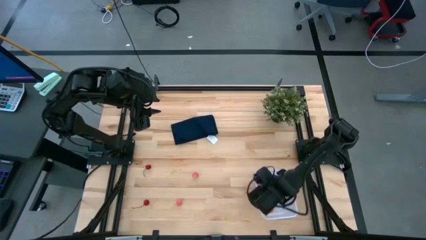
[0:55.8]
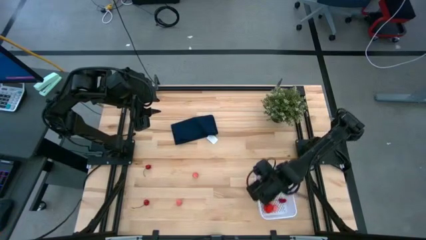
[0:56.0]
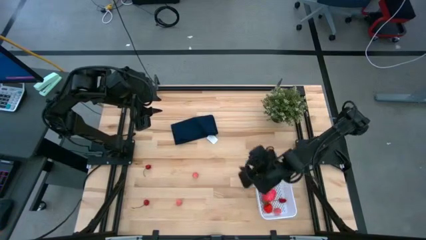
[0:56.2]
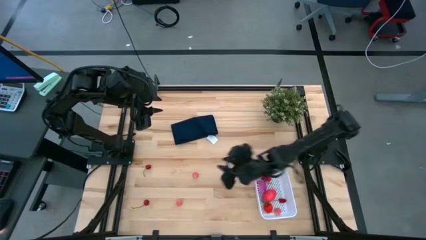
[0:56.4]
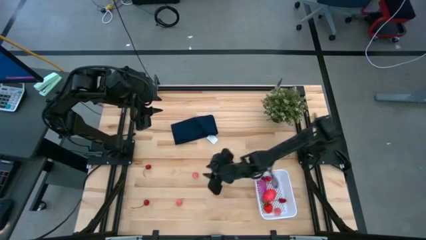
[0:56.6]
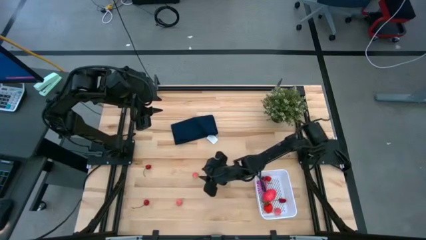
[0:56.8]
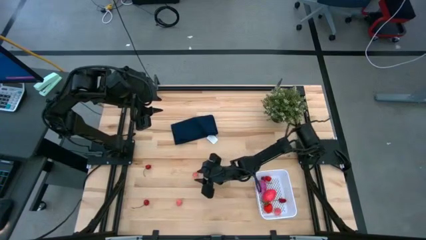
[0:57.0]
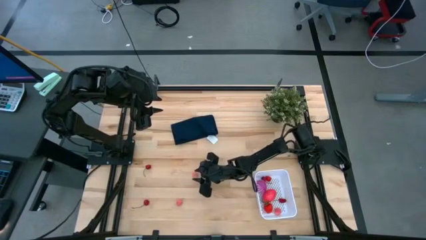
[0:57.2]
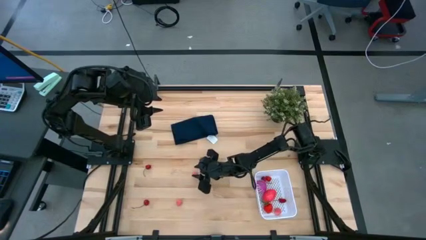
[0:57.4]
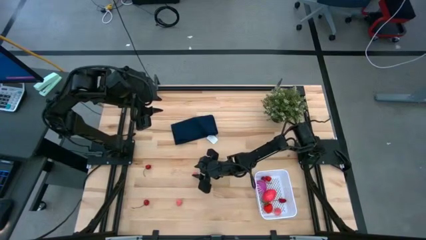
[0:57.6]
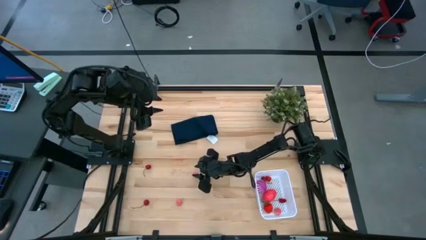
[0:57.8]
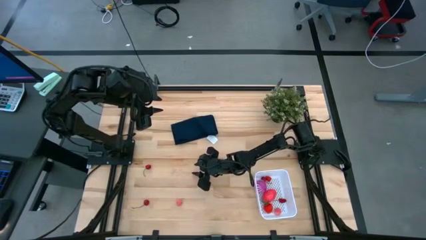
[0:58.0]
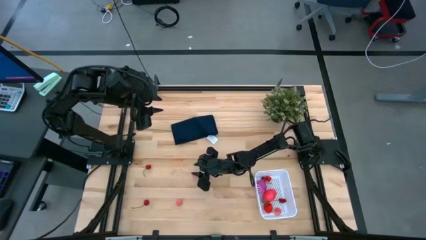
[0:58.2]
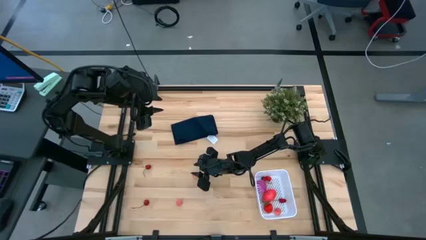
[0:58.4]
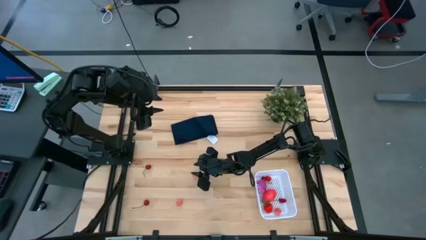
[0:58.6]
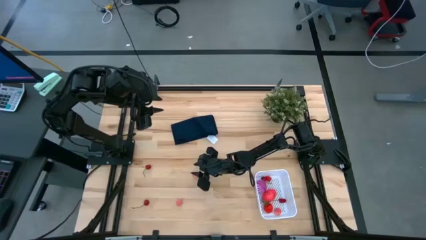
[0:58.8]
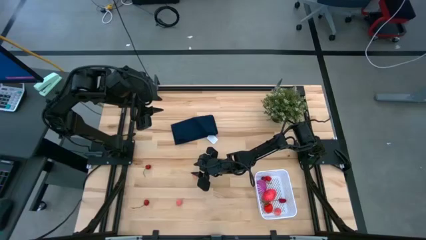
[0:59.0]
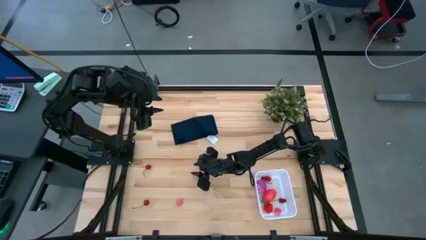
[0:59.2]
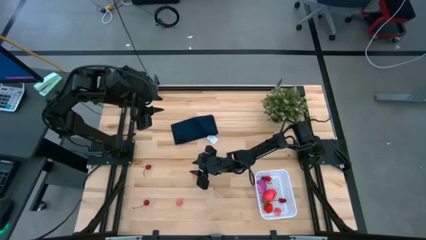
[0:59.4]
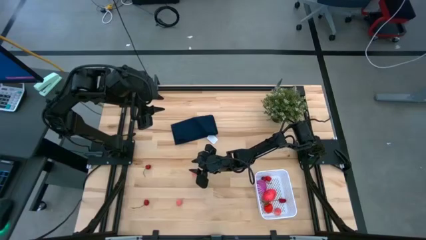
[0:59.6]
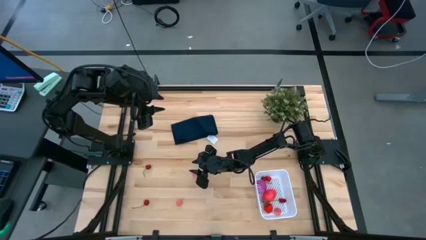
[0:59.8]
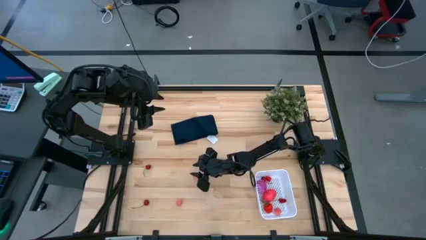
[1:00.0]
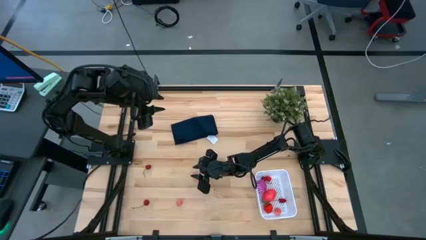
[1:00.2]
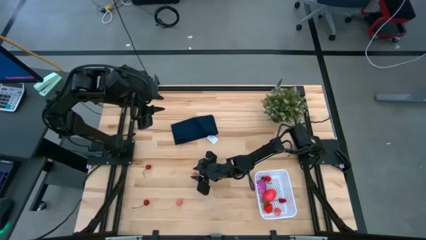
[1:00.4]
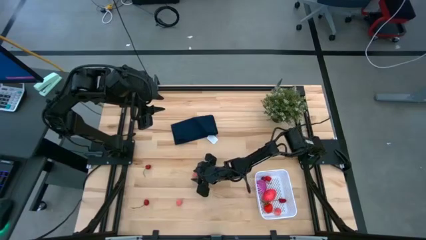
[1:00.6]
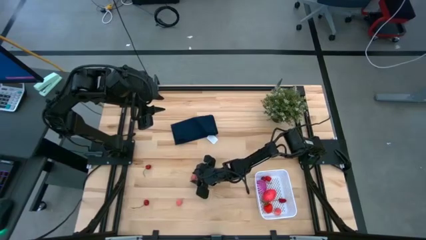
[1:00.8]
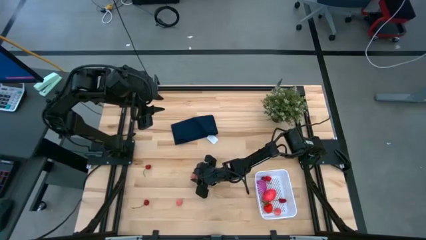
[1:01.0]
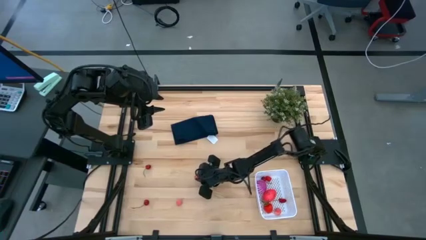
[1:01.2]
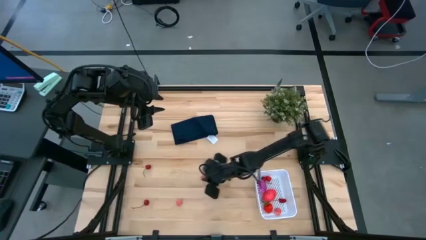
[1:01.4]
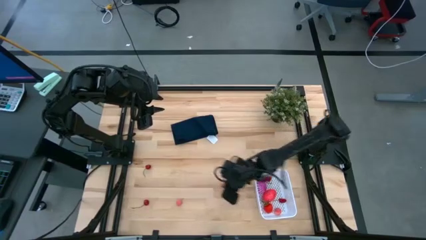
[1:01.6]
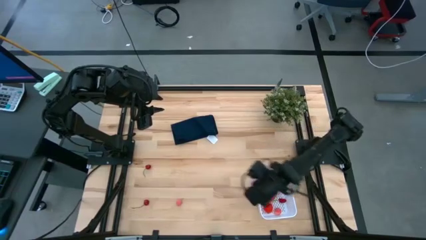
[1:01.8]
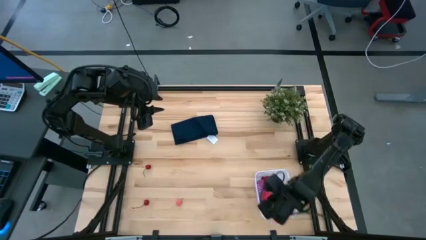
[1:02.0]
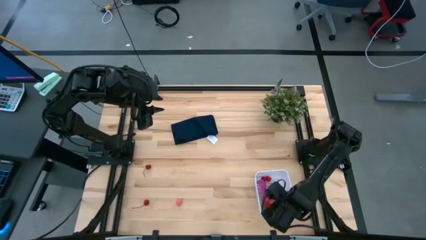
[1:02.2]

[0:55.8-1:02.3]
Task: Pick and placing Produce into tupperware
Put the peach into the white bin

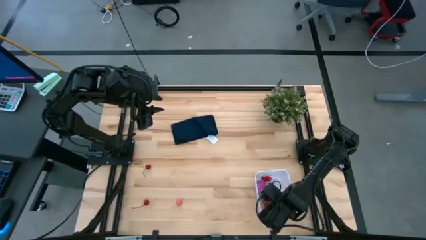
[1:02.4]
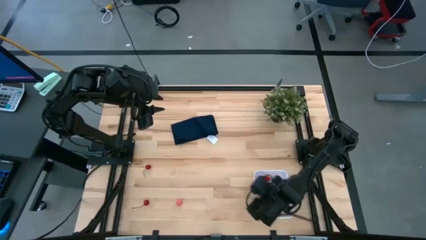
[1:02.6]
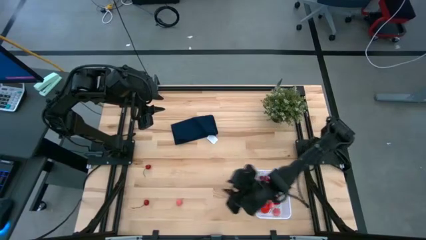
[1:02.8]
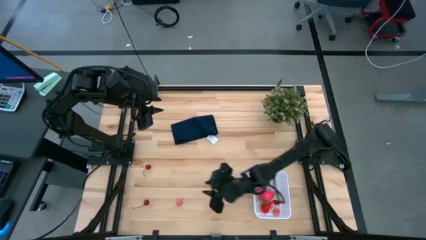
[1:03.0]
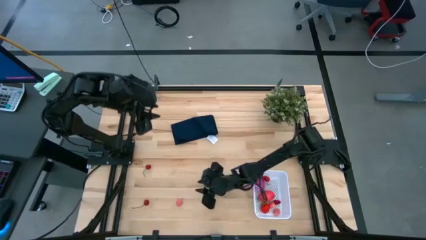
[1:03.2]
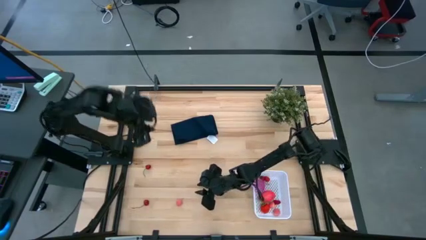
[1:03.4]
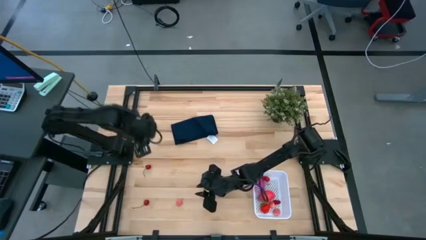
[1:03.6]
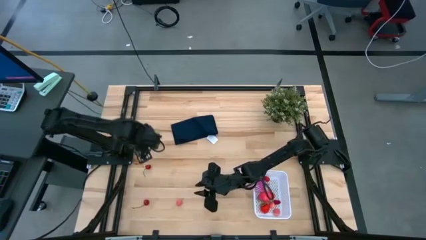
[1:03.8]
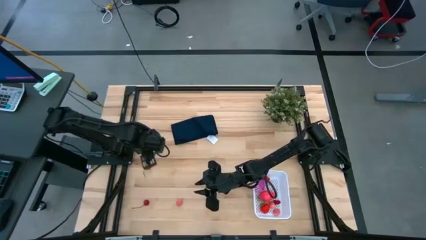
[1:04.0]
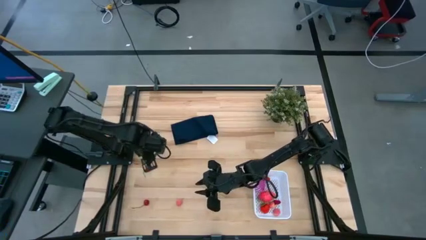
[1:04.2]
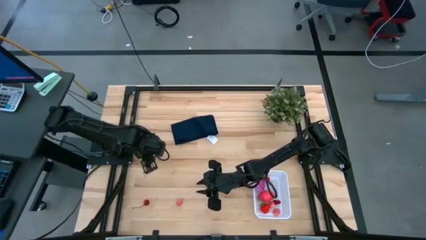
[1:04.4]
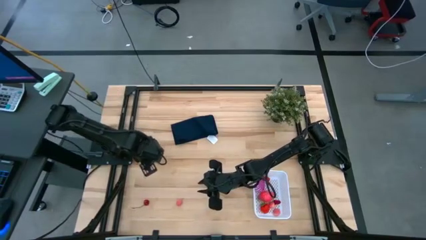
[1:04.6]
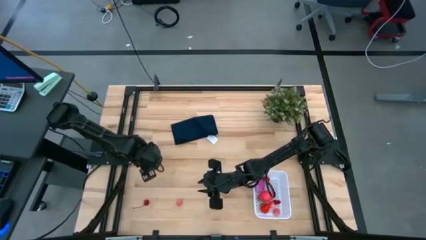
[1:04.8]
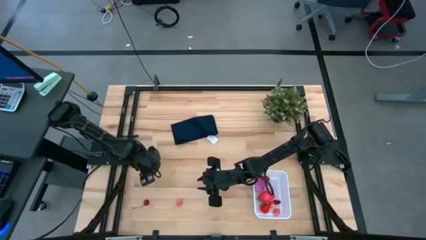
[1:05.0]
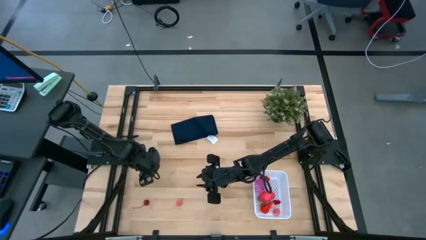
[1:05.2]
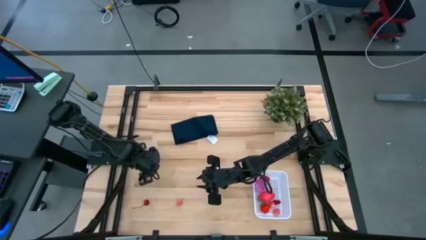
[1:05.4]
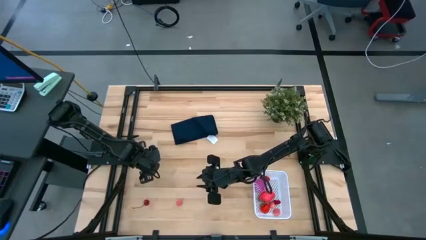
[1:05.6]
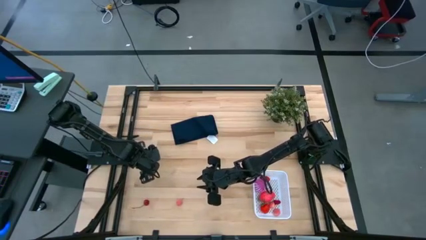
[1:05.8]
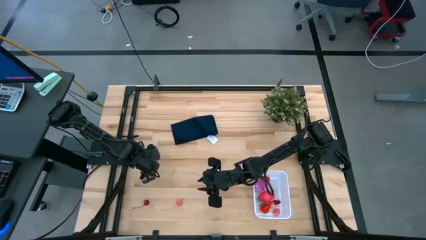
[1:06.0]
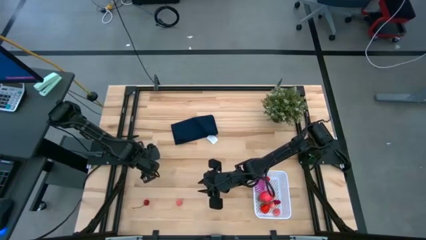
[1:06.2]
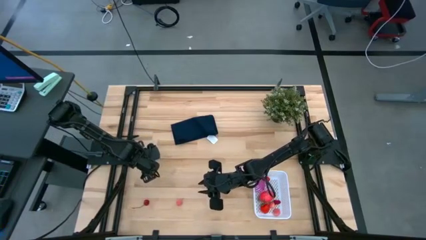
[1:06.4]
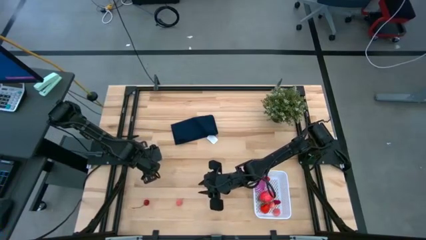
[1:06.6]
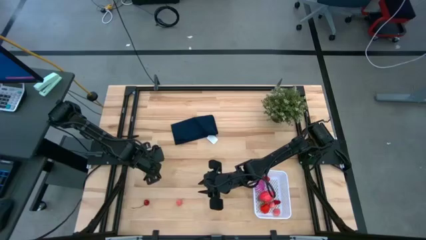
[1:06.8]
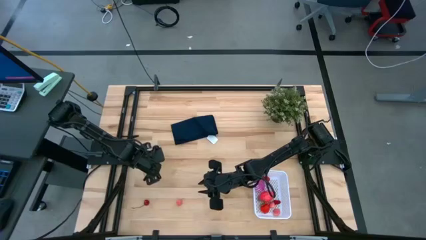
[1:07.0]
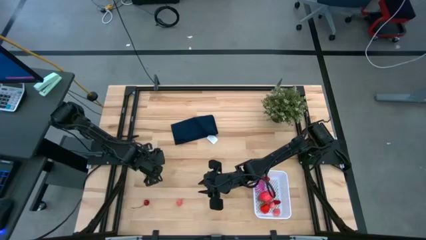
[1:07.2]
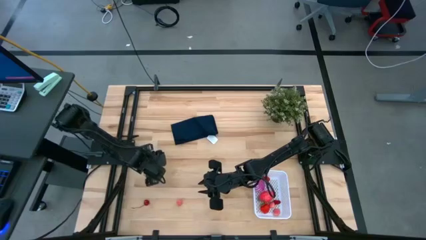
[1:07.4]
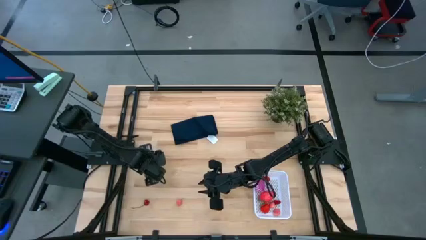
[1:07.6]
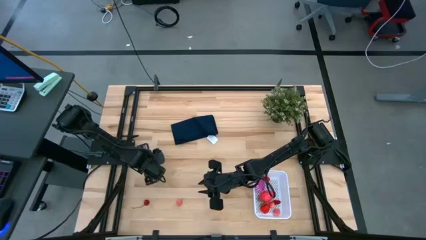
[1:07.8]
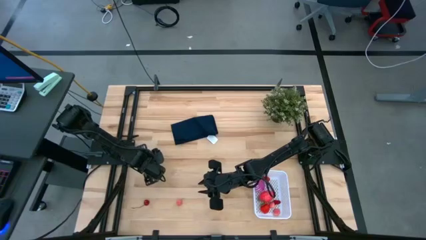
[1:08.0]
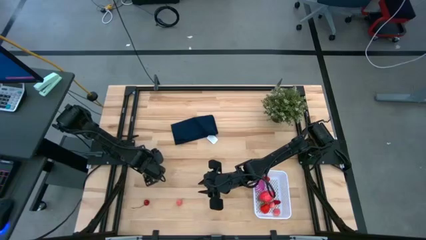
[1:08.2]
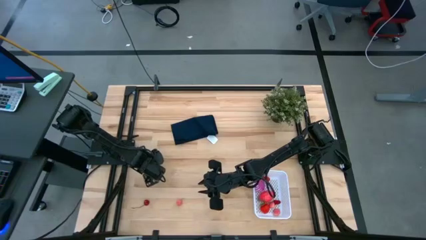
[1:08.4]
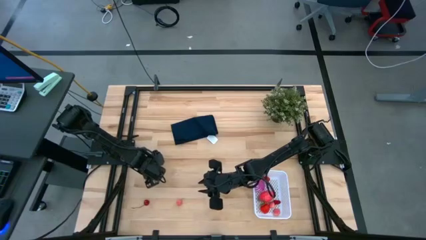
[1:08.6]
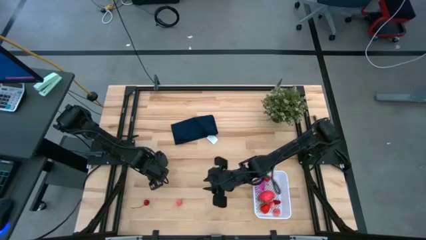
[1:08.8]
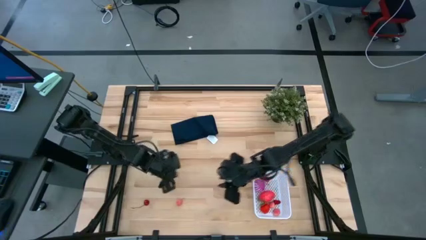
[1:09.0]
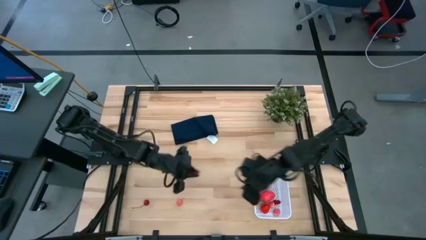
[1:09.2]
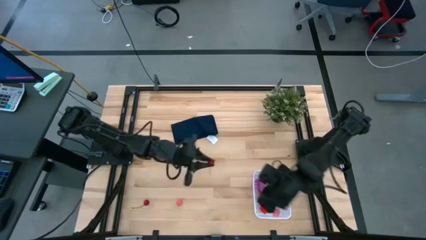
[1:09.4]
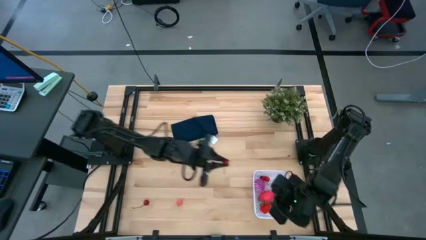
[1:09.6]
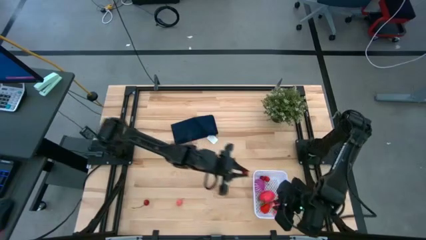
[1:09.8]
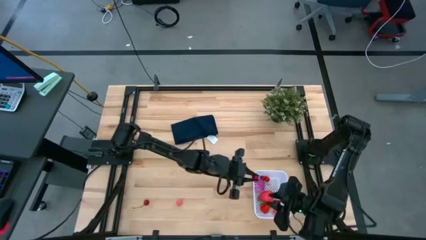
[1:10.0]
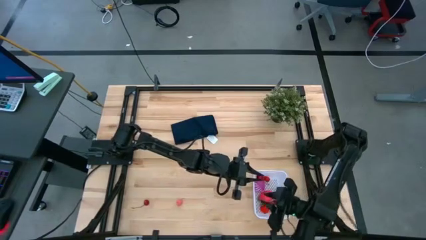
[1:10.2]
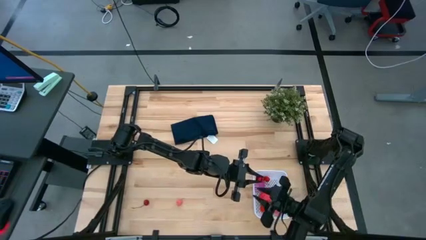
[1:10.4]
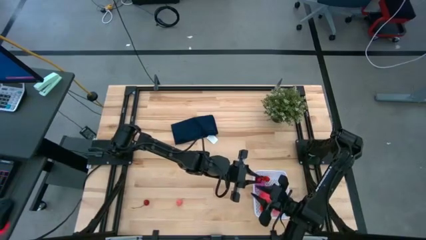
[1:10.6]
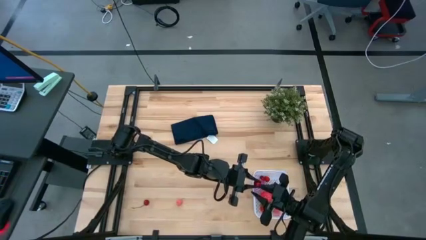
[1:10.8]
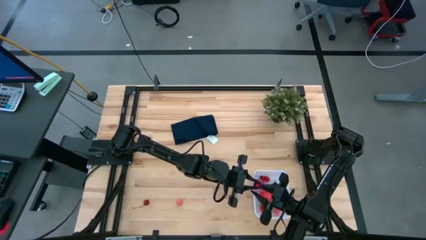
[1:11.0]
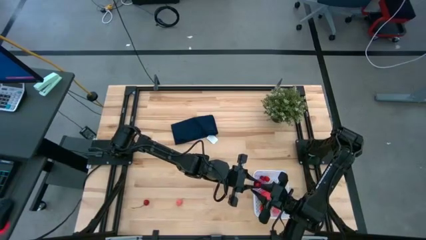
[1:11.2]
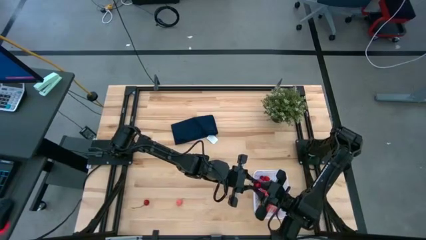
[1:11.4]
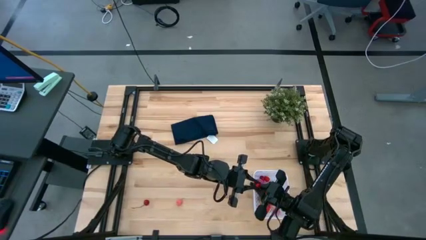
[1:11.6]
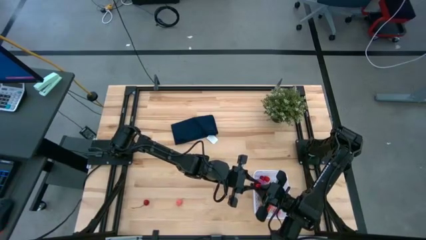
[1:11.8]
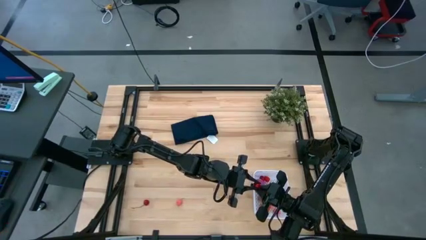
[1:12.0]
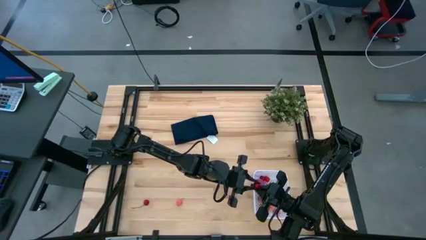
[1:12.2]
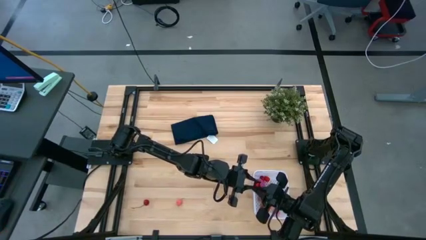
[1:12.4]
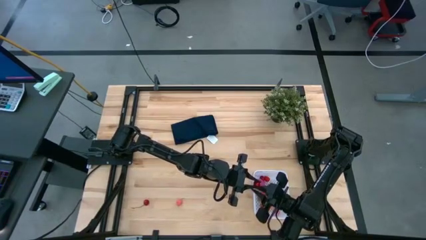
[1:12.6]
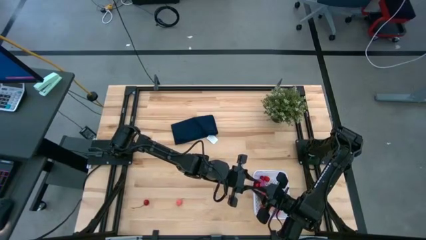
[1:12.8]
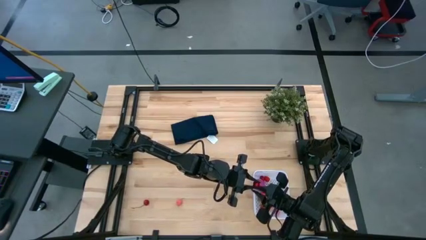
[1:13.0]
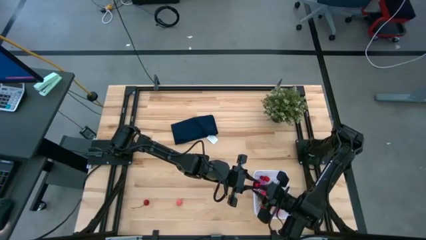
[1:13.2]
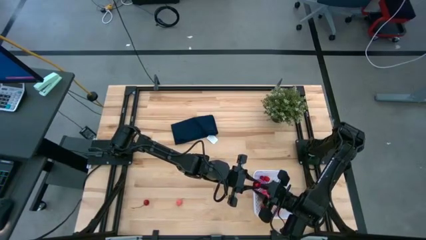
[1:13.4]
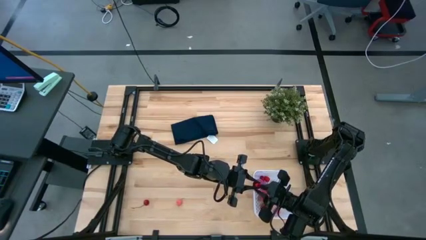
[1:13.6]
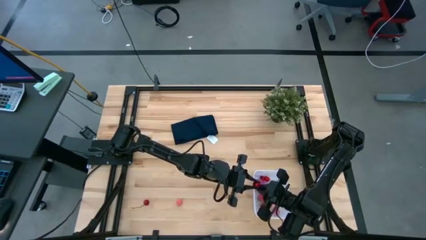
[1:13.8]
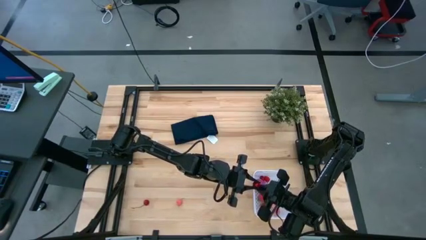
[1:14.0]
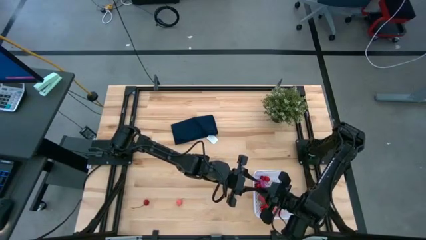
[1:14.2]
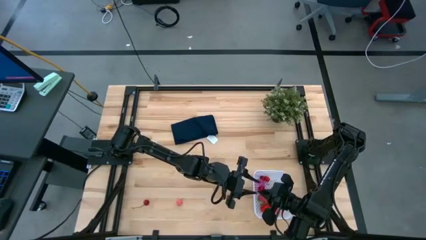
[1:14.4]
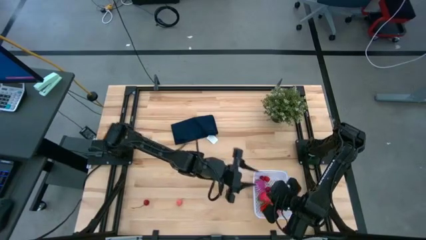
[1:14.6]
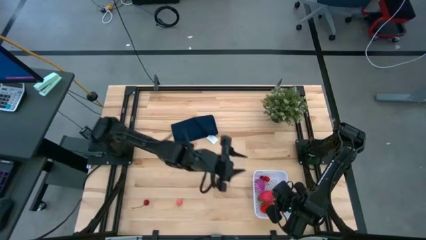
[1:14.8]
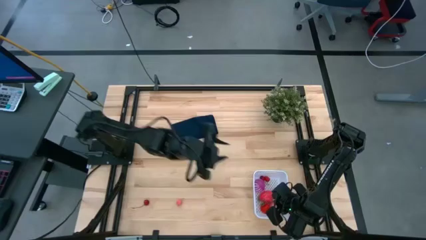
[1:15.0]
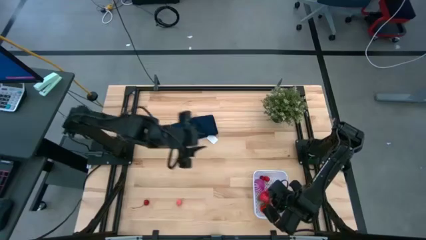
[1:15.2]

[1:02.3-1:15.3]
Put the cherry into the white bin
